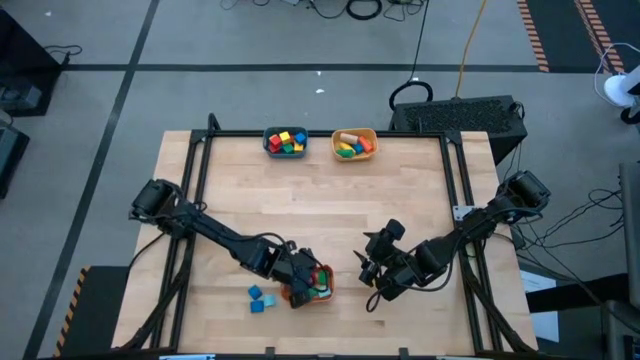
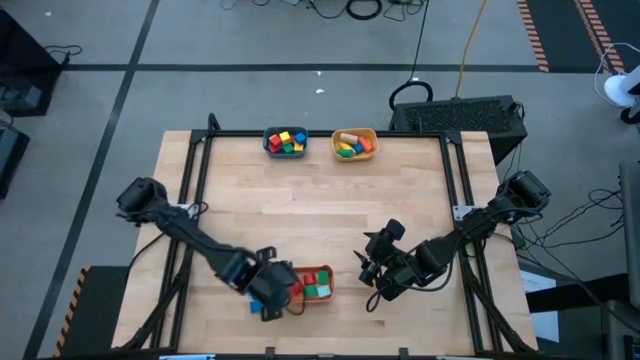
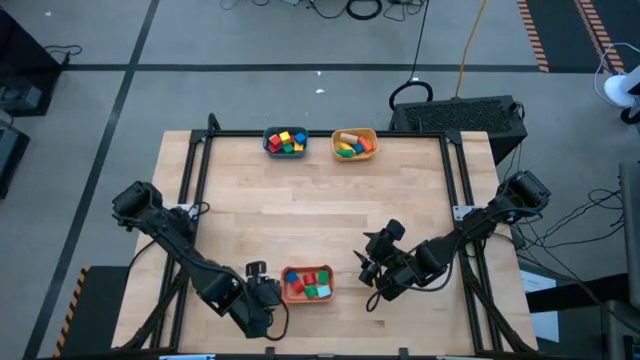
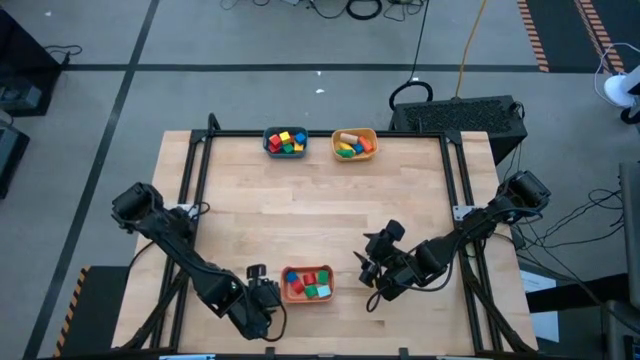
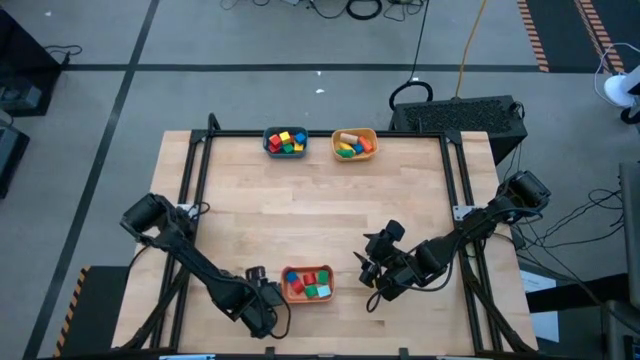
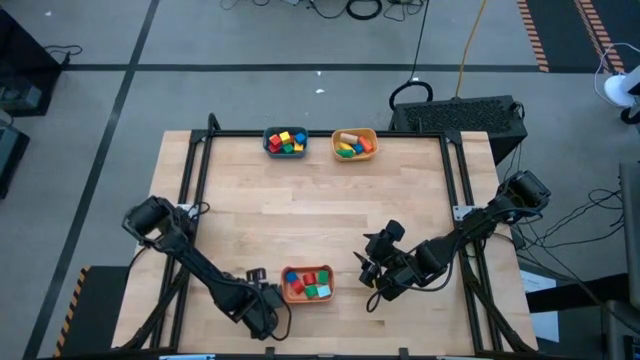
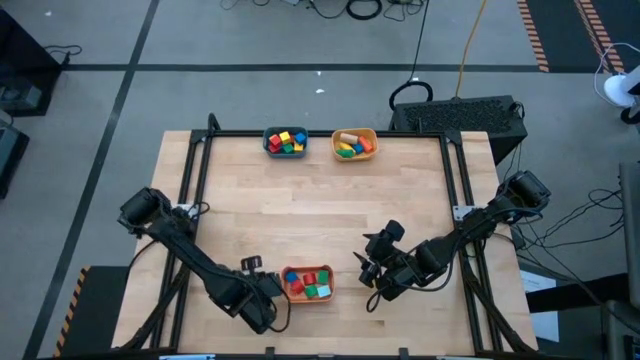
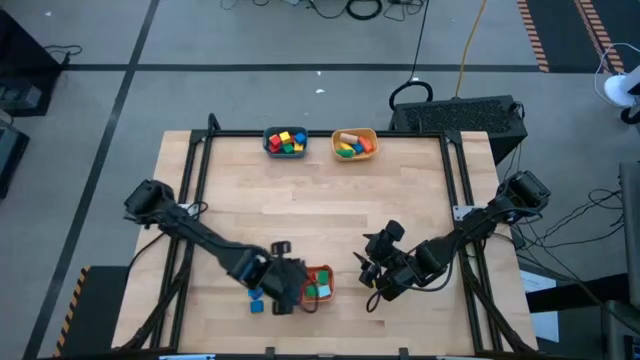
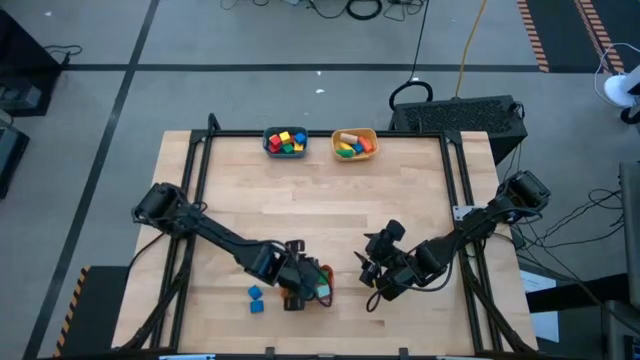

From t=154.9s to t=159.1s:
Task: Sort blocks by size
Put the light blue half circle block into the orange bin

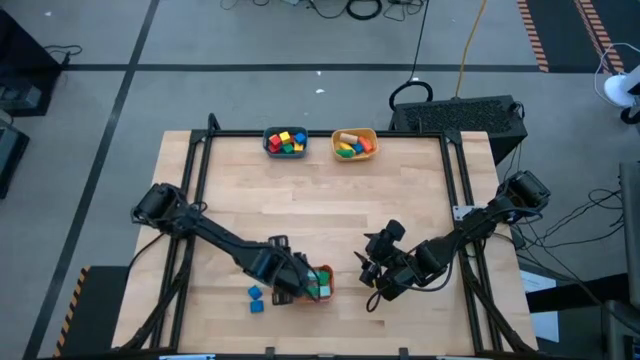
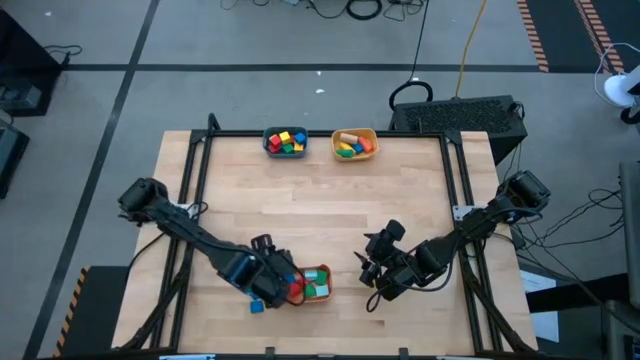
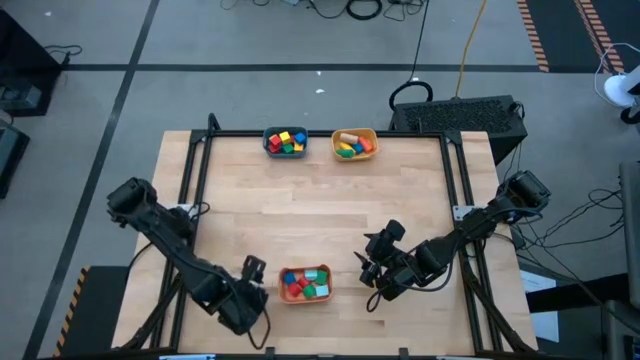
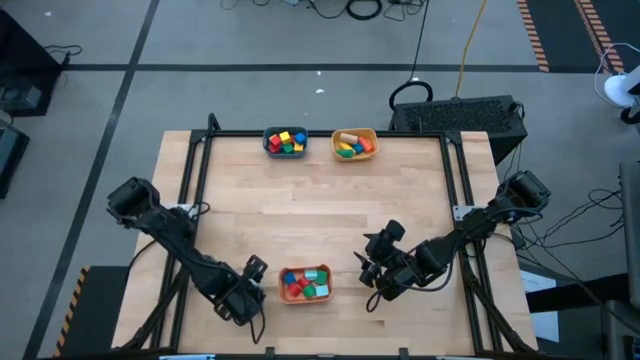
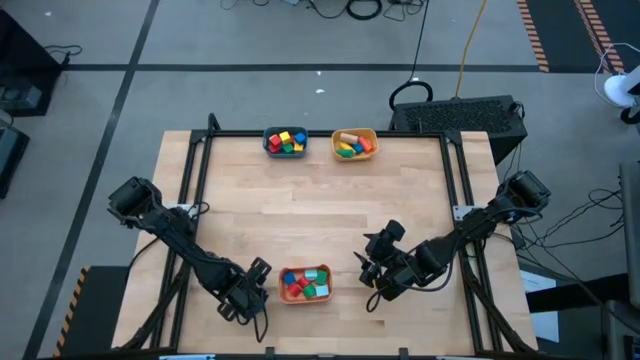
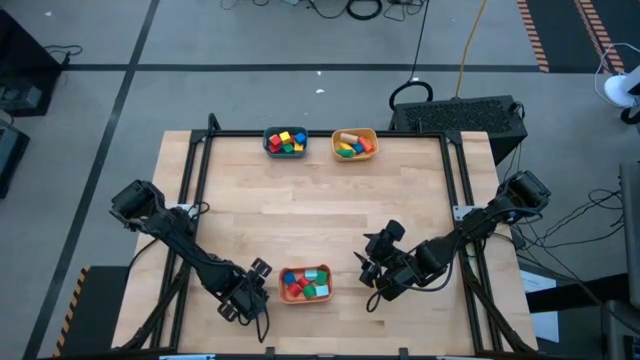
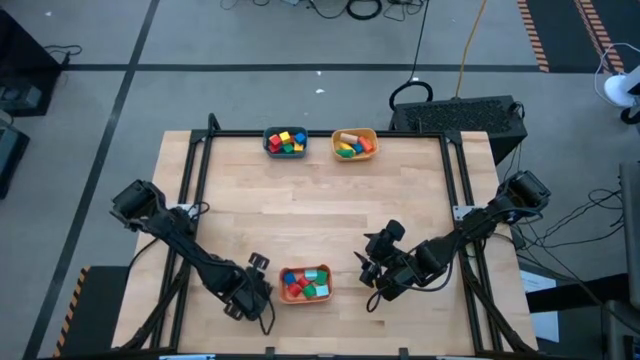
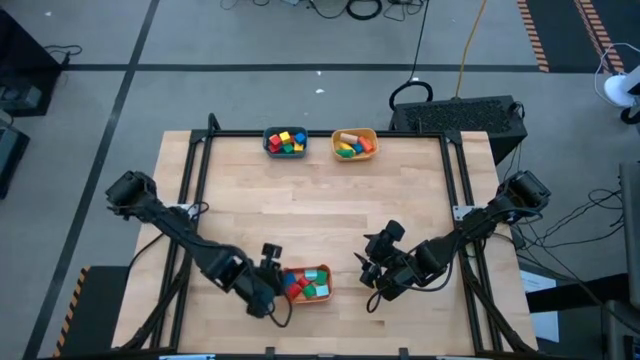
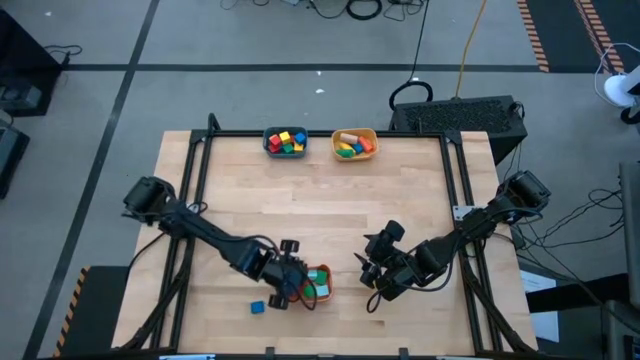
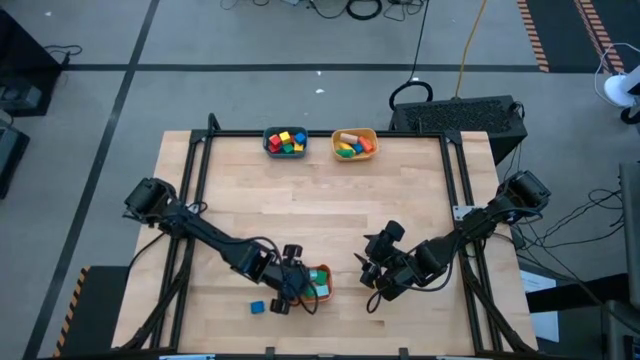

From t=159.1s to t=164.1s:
Put the blue half circle block into the orange bin

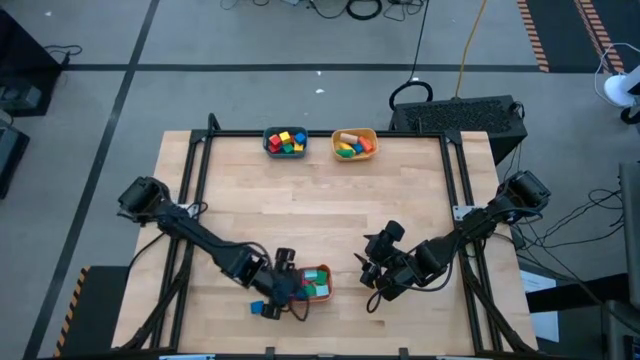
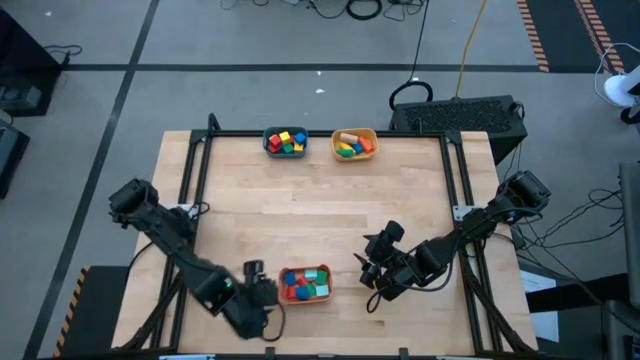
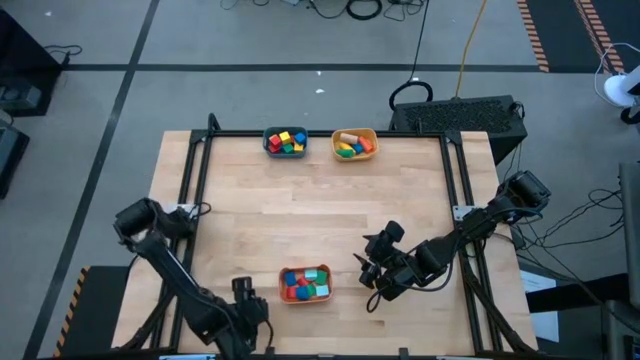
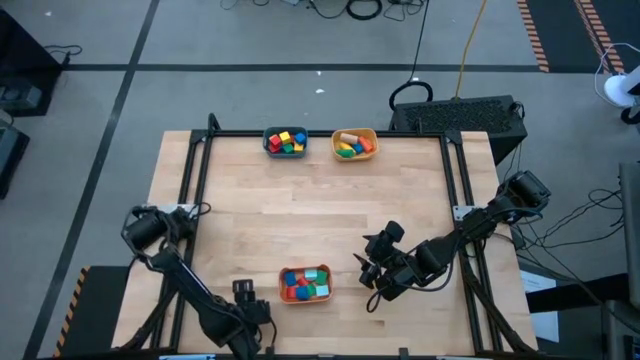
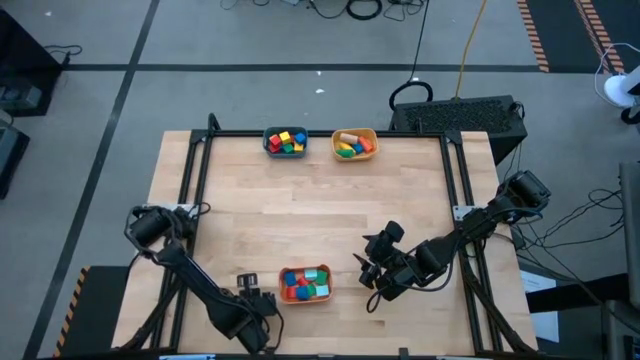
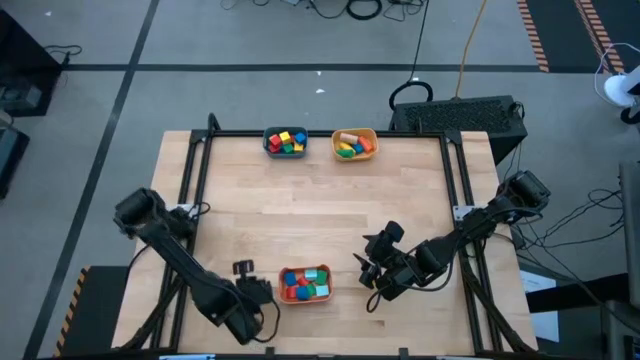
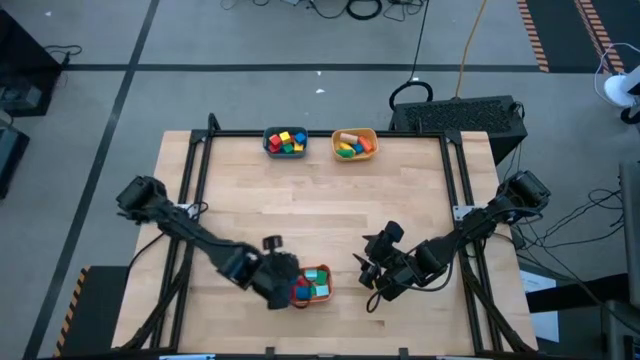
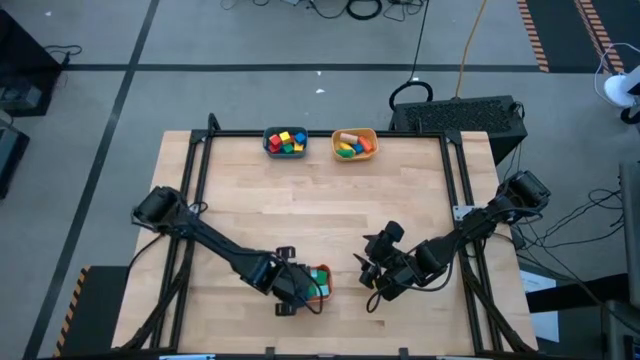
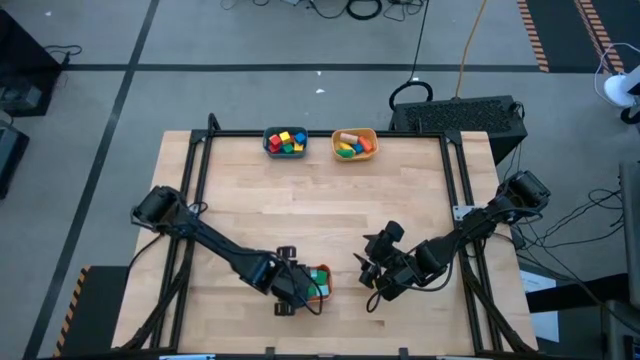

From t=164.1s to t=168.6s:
Put the blue half circle block into the orange bin

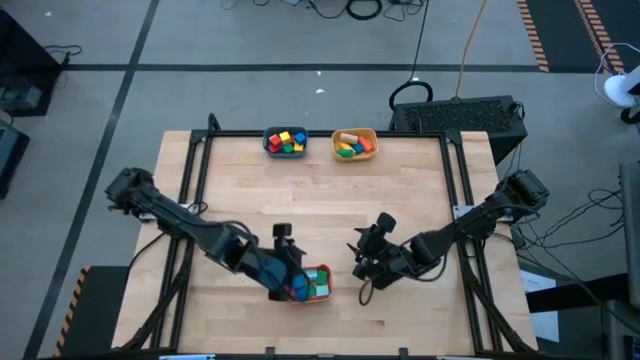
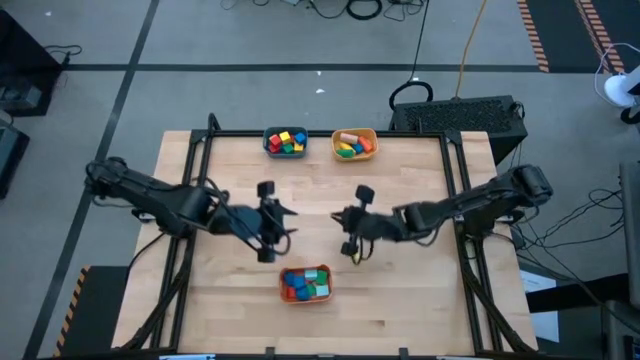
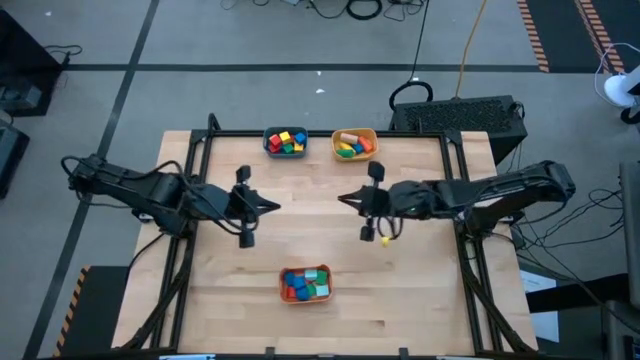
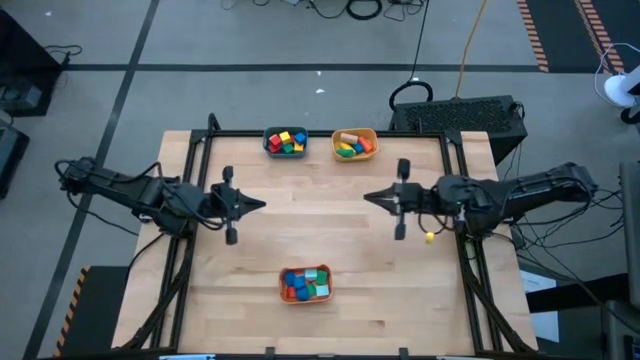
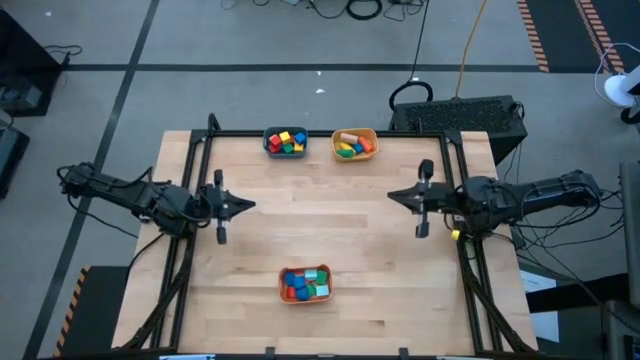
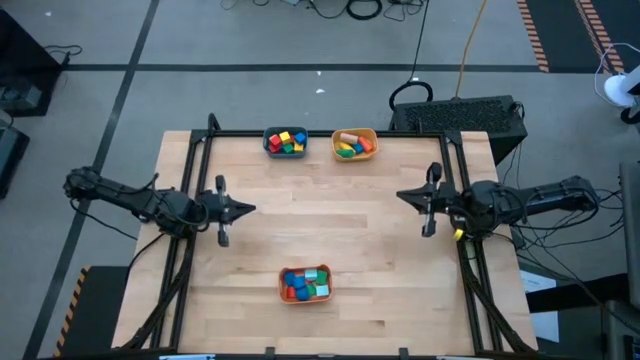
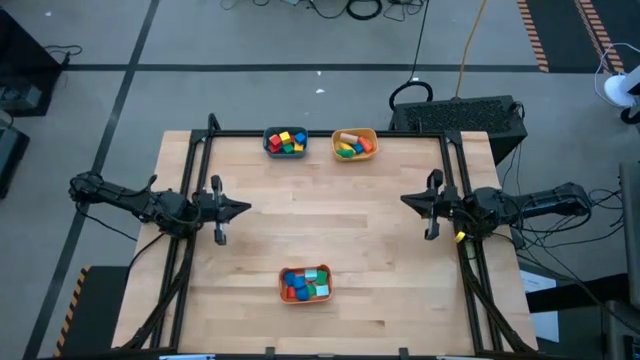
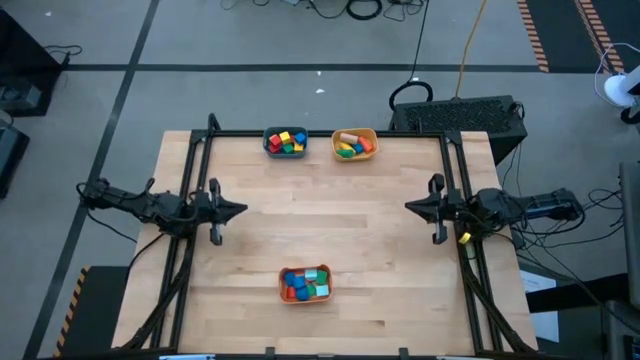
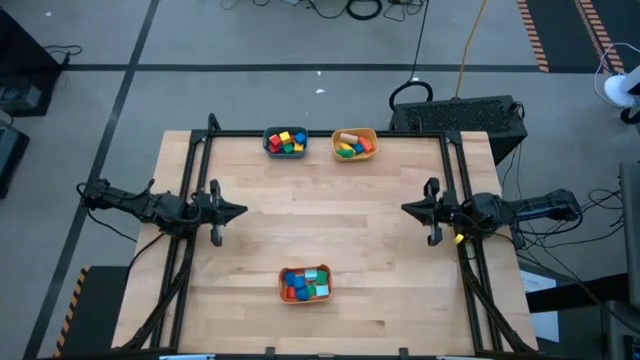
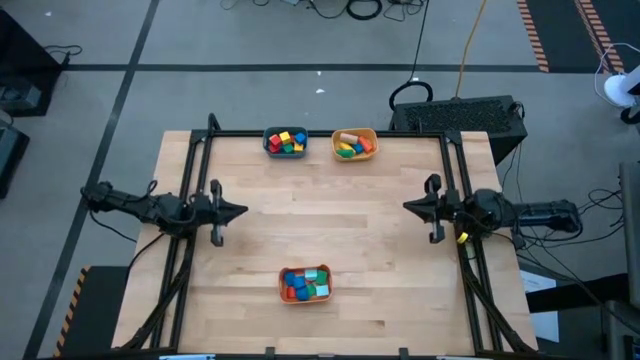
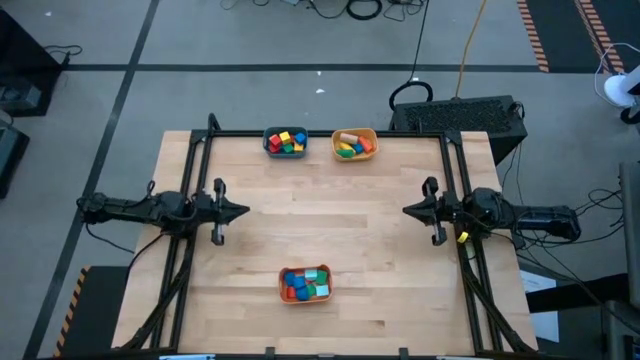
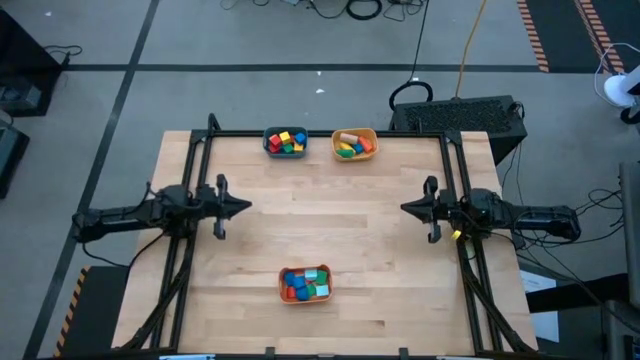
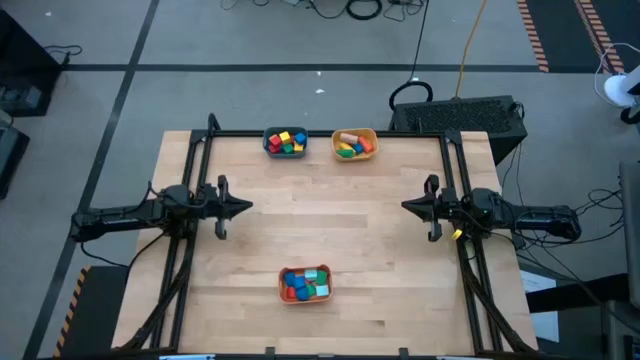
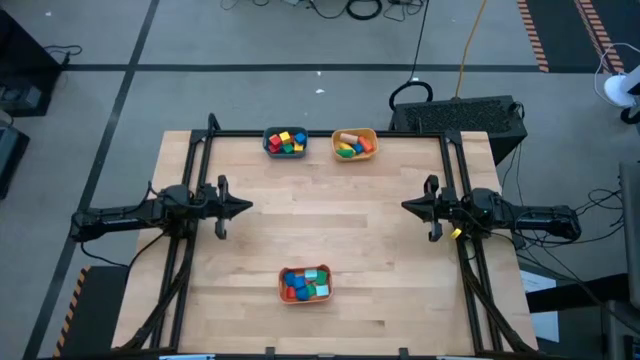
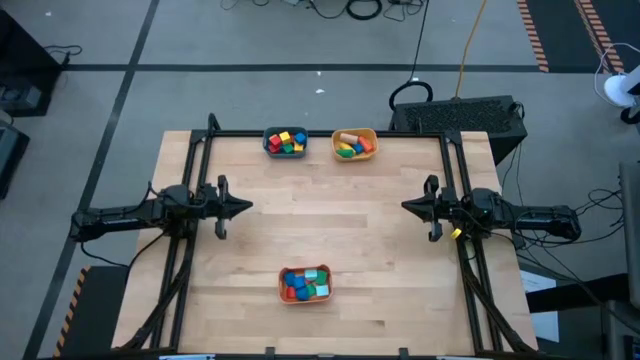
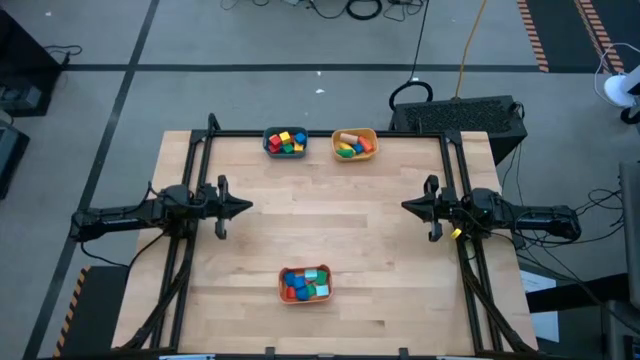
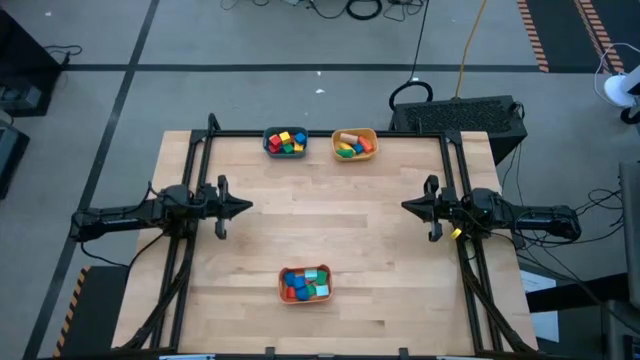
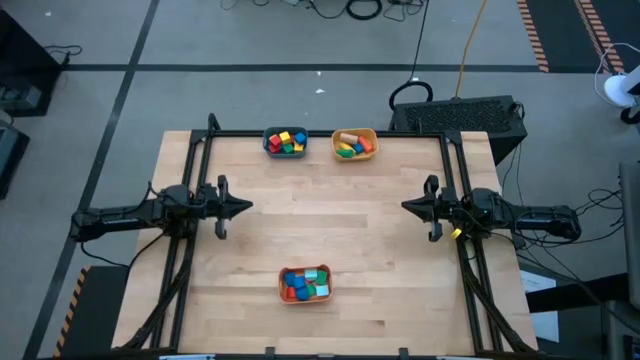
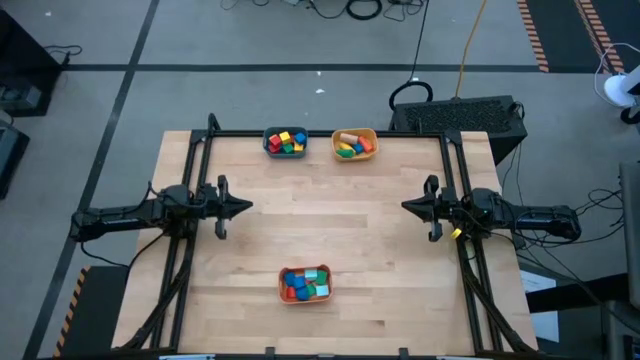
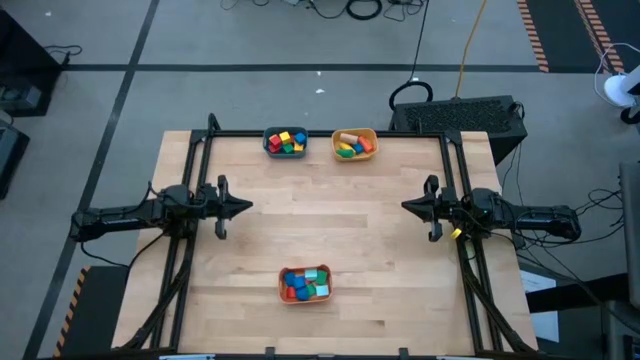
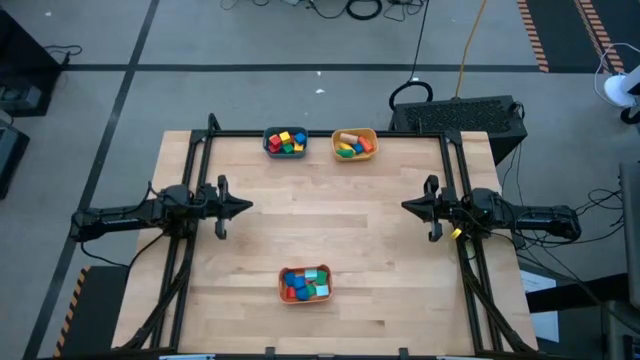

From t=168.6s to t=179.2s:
Return to Home Position
